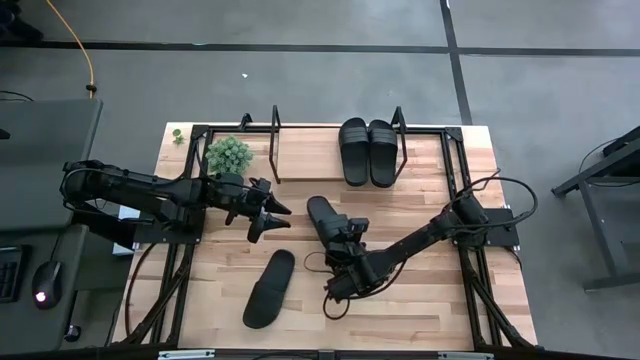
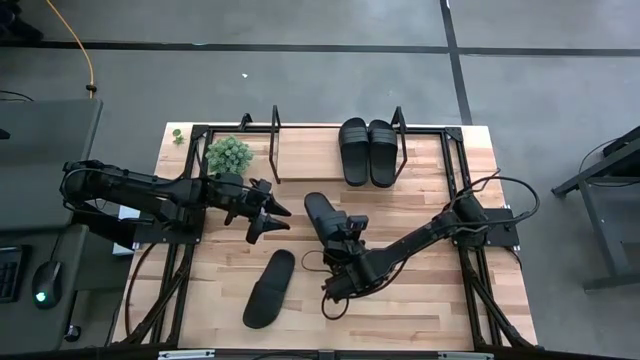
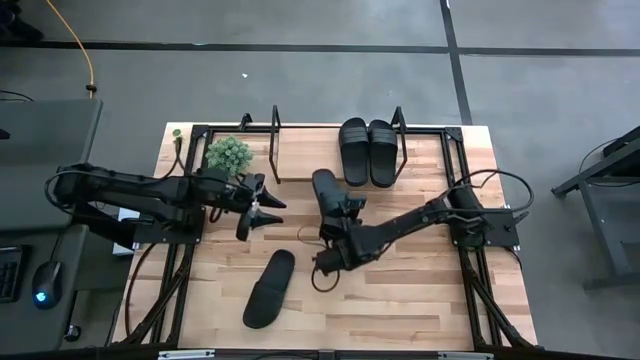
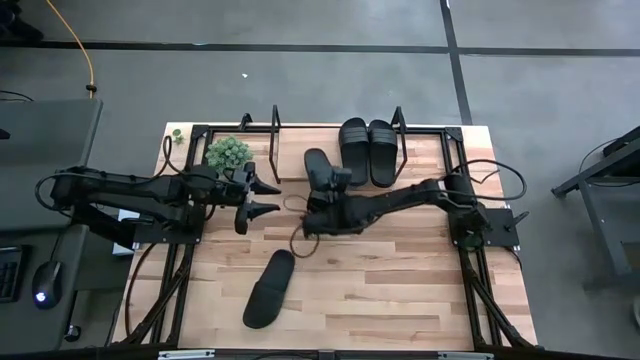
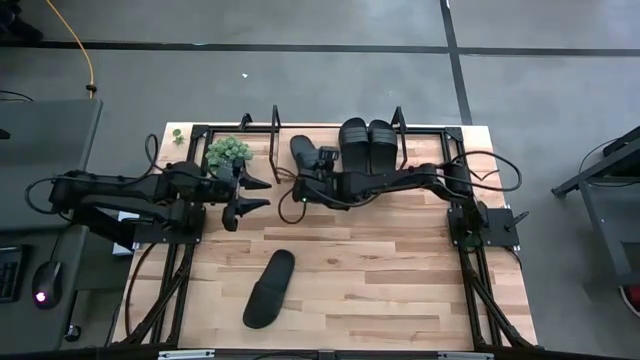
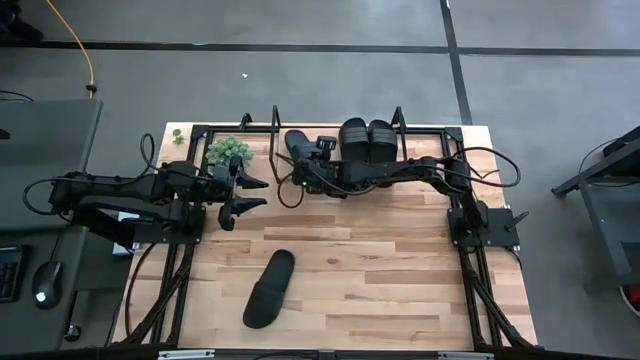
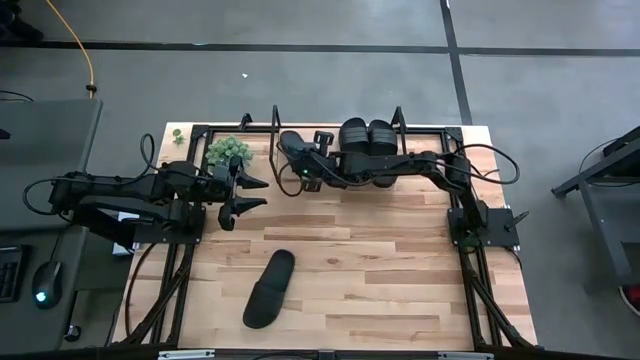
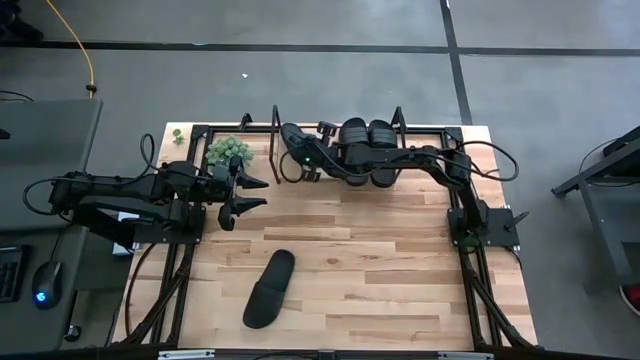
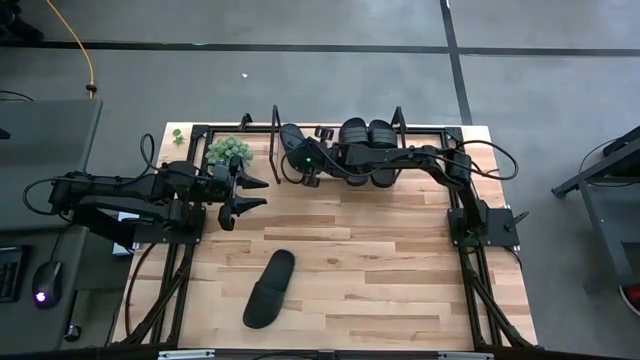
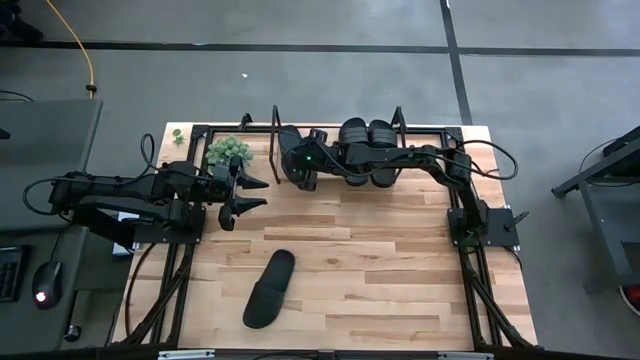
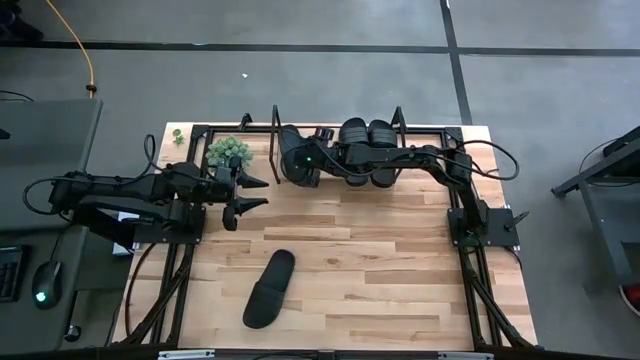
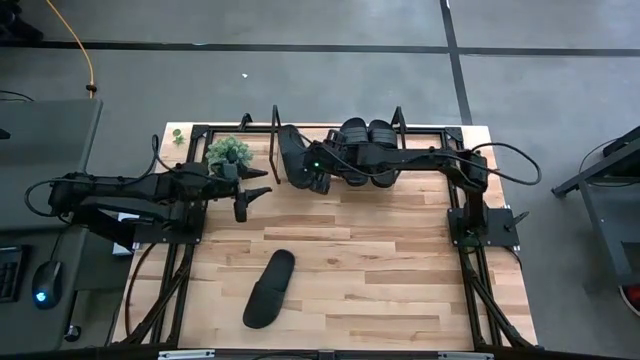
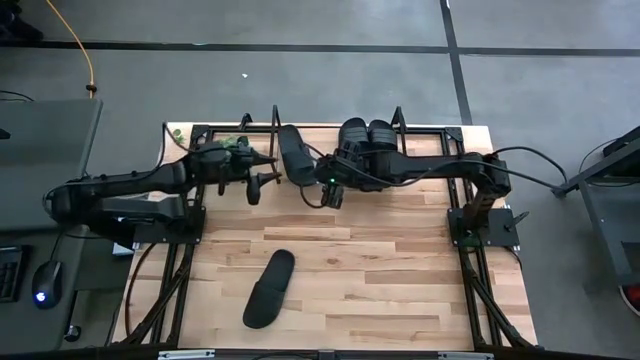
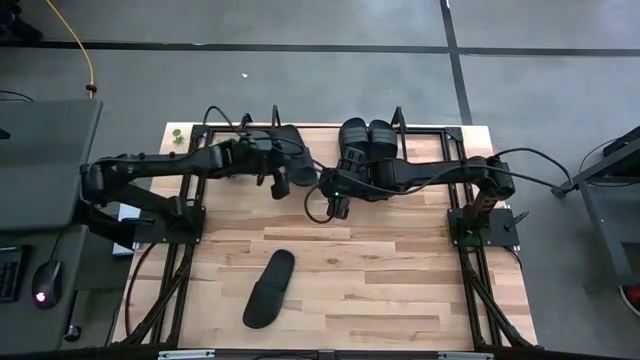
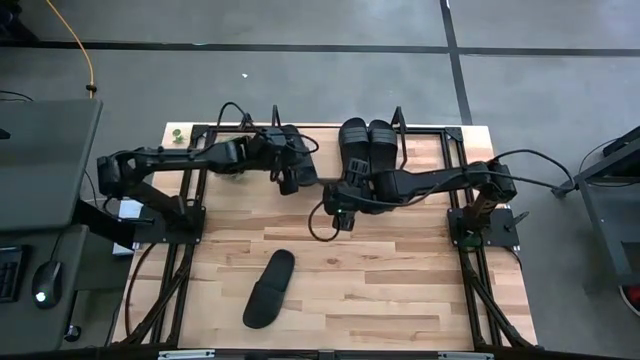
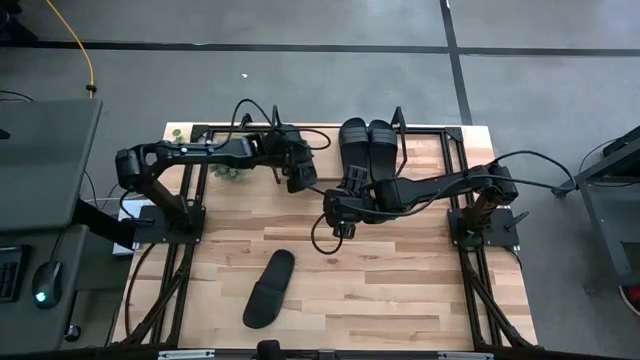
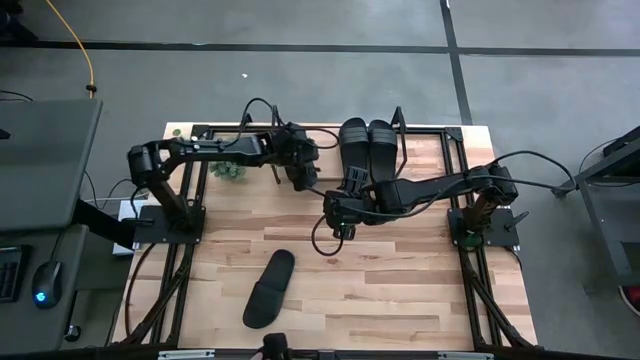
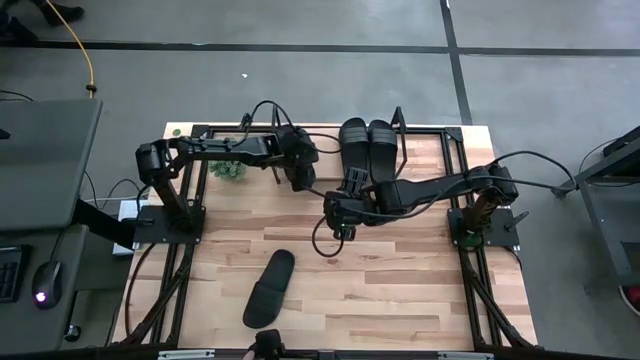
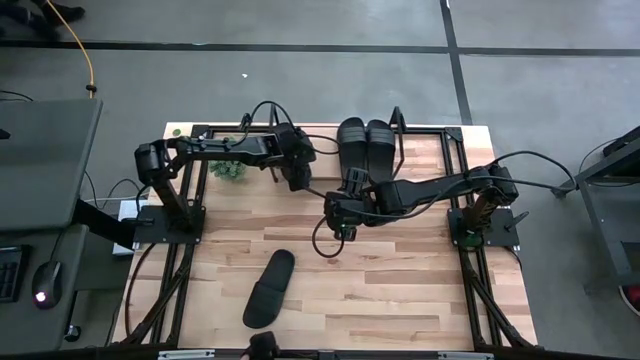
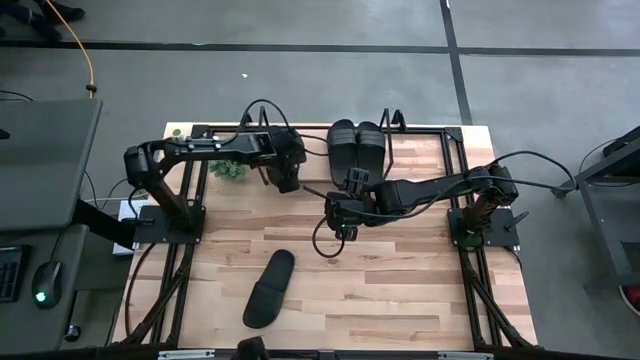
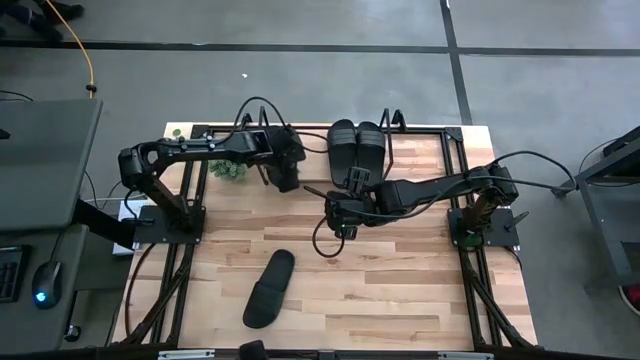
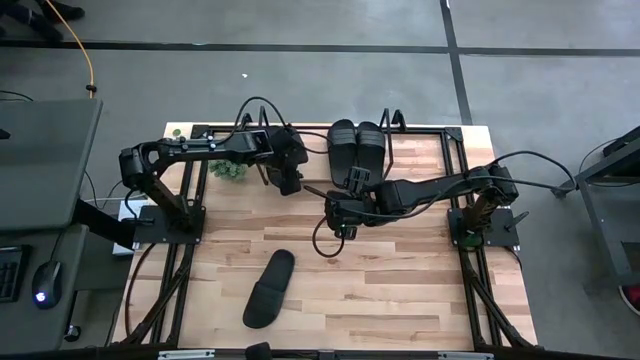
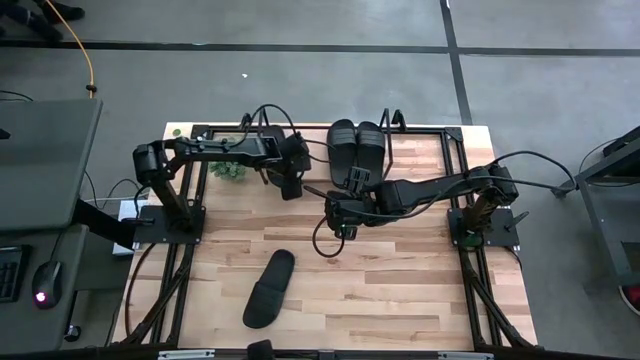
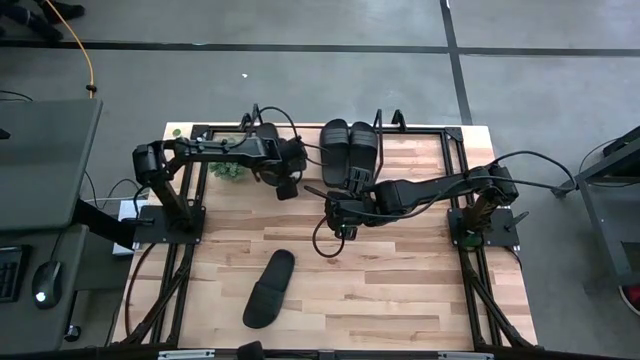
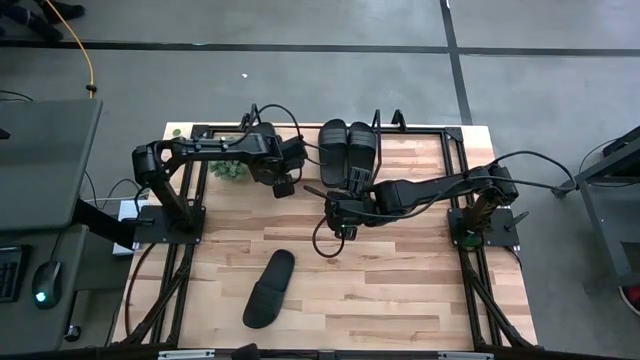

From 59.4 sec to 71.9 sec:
Task: Pick and place slides into the shelf
Put the black slide on the shelf

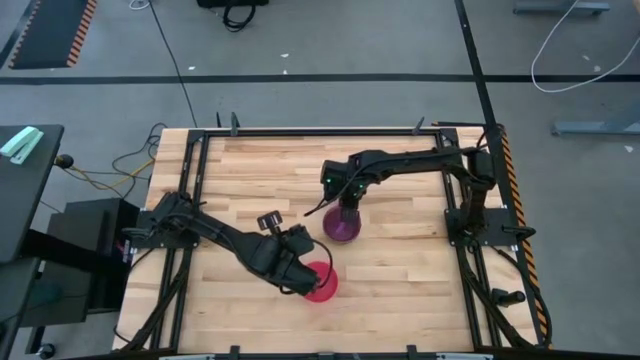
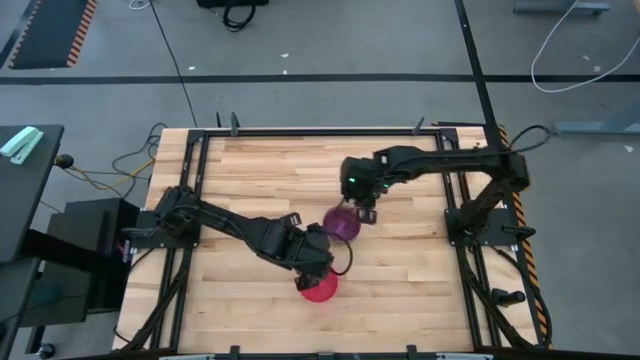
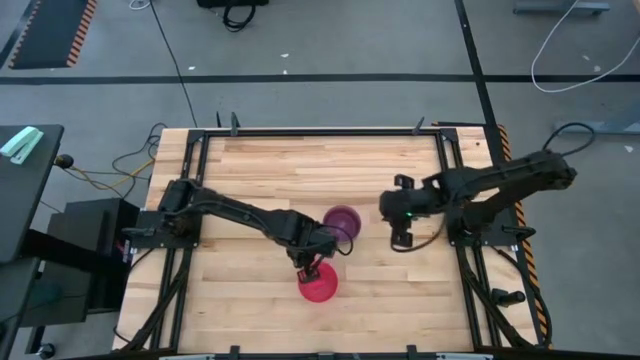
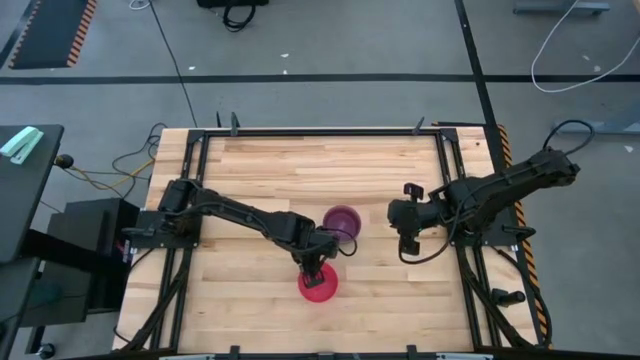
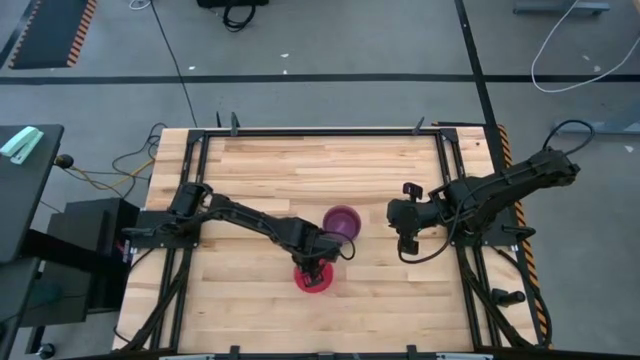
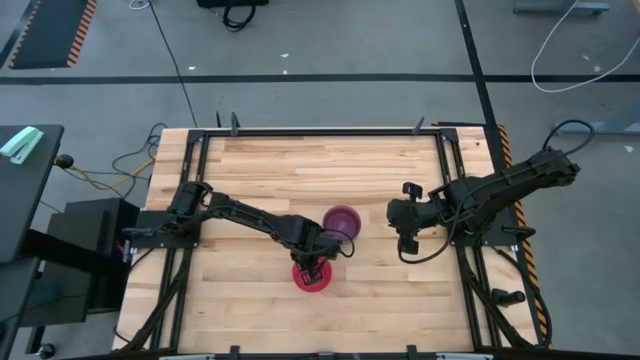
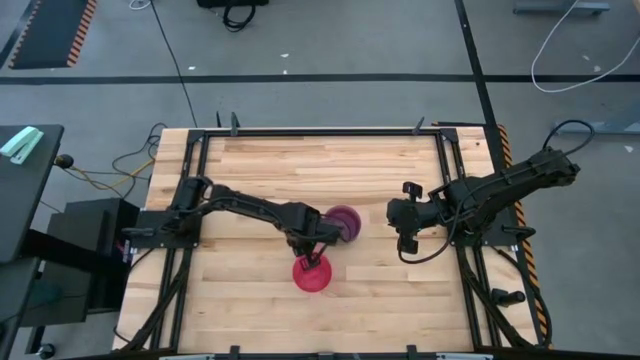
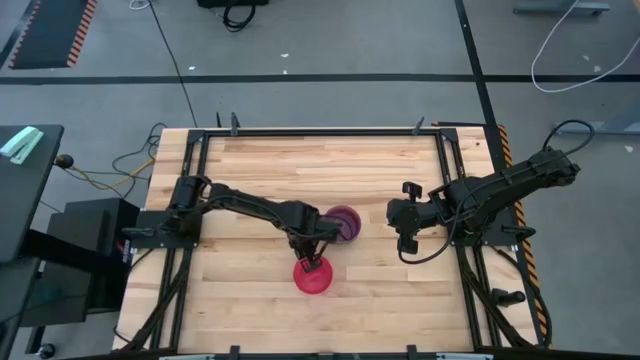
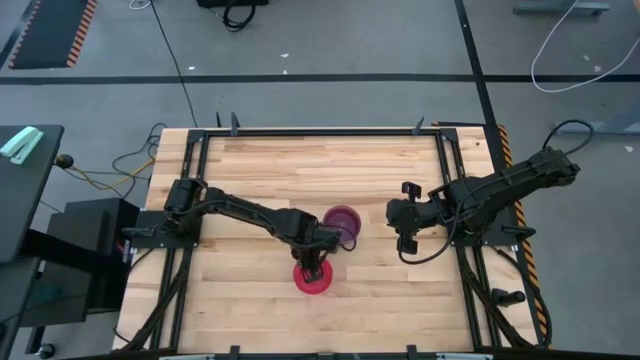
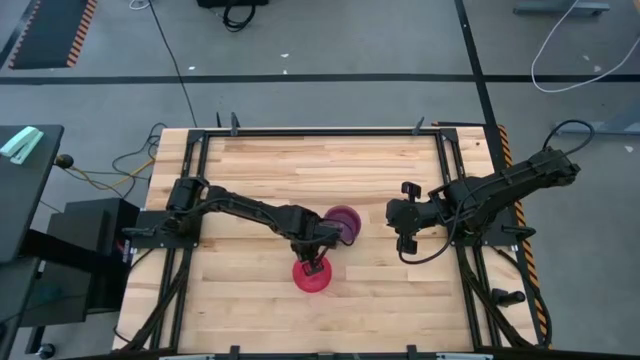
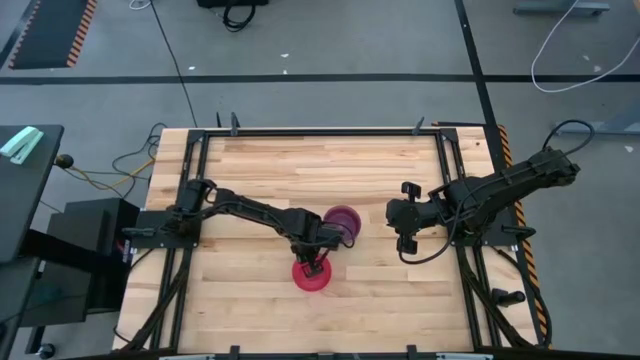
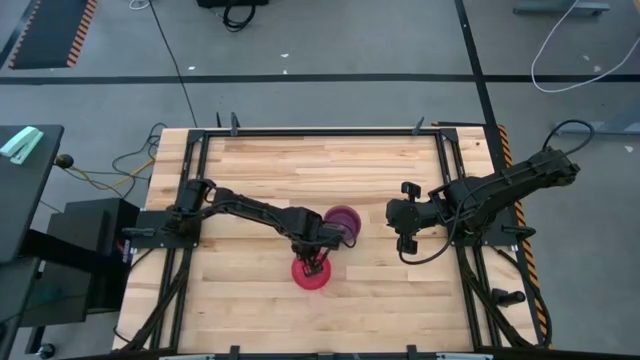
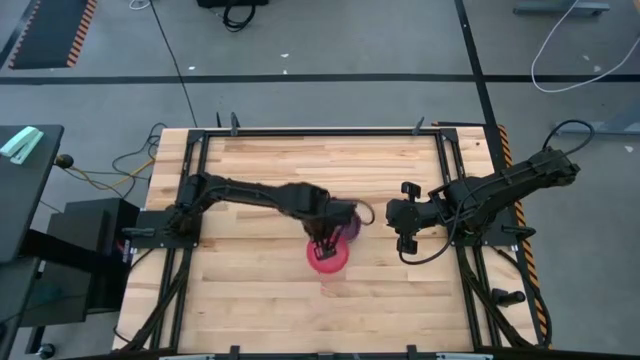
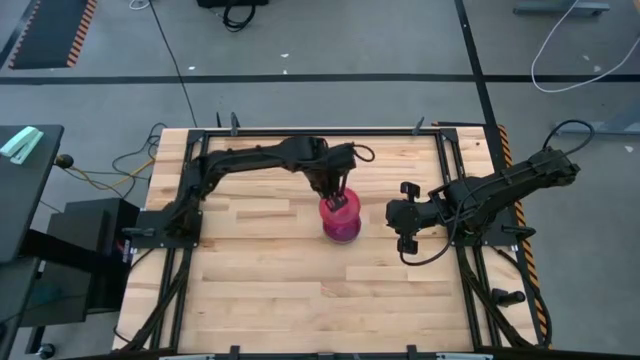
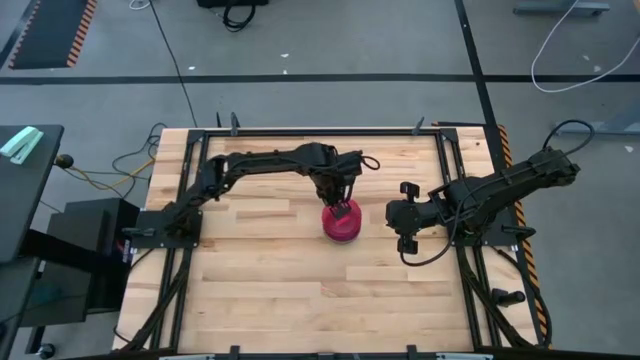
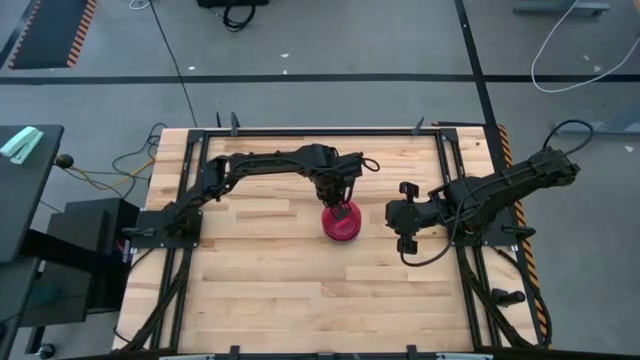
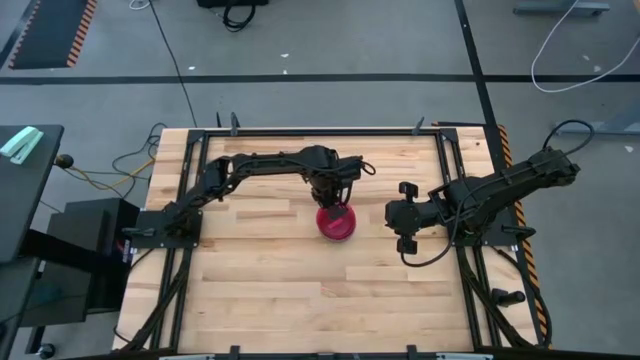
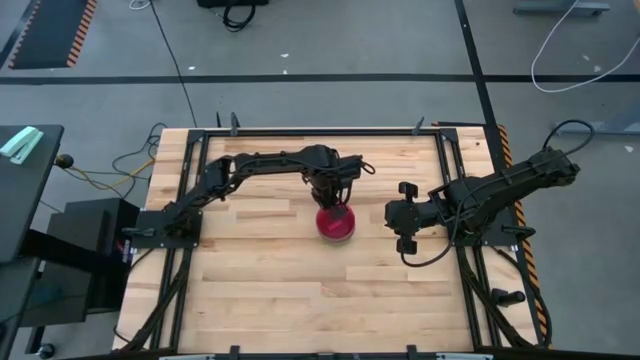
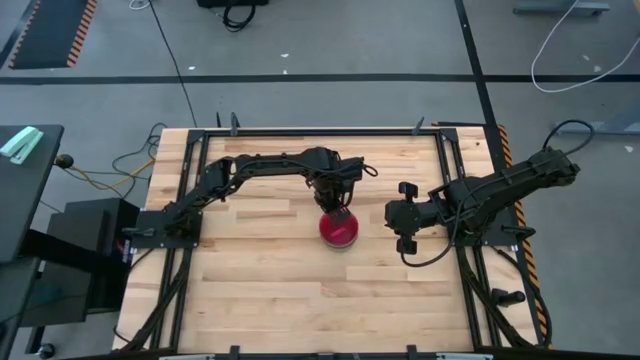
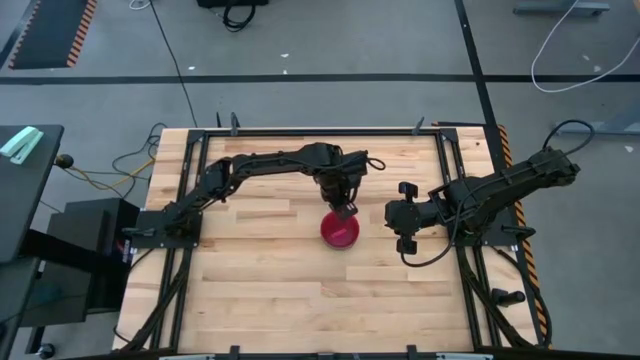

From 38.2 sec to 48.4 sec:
Task: Nest bowls inside each other
Stack the red bowl on the purple bowl
